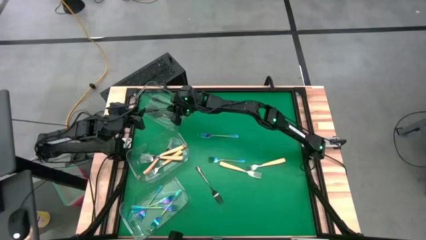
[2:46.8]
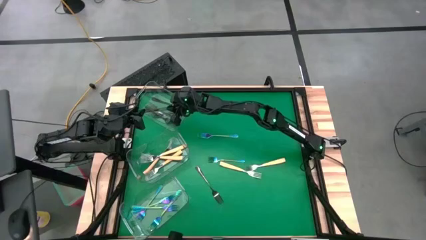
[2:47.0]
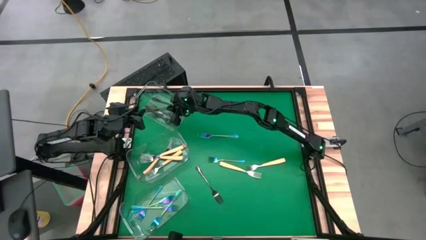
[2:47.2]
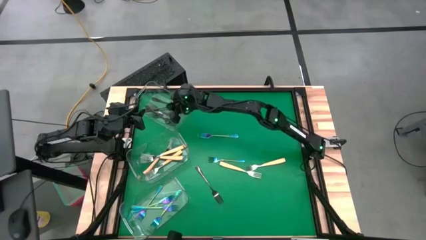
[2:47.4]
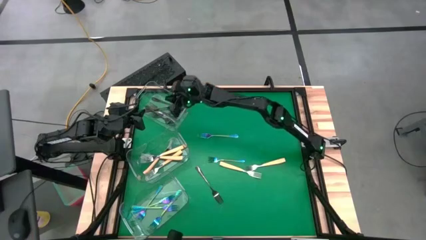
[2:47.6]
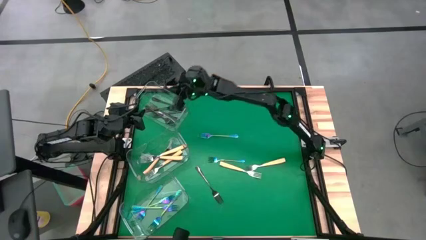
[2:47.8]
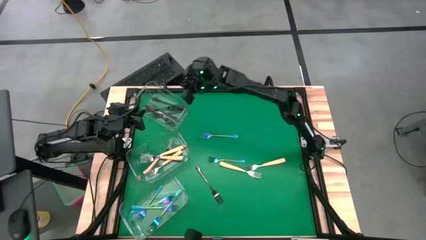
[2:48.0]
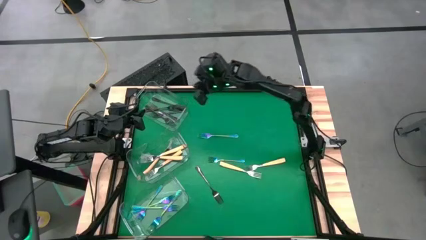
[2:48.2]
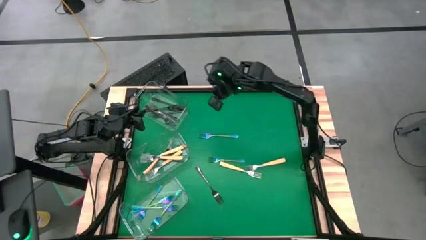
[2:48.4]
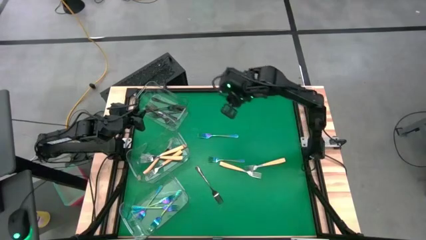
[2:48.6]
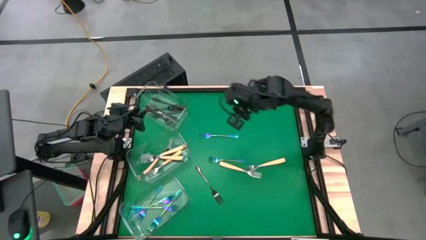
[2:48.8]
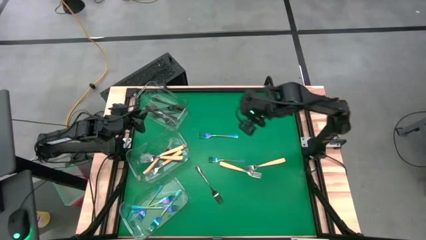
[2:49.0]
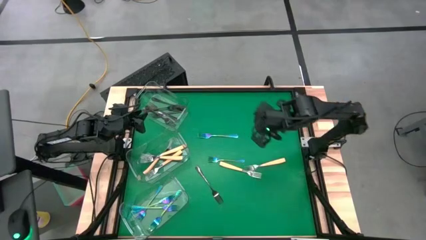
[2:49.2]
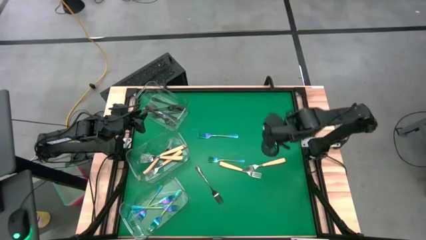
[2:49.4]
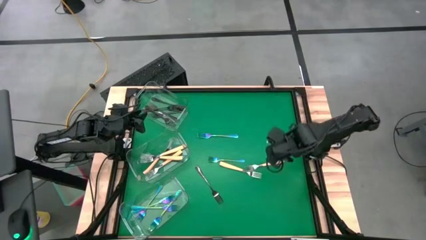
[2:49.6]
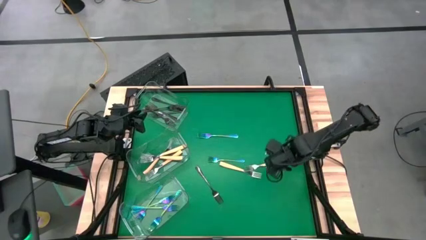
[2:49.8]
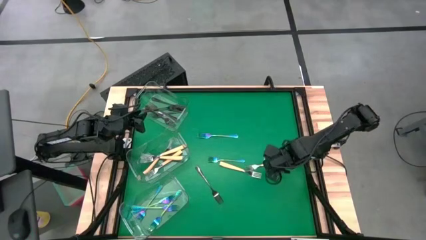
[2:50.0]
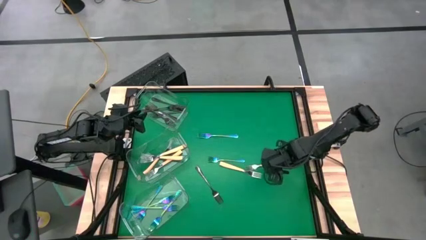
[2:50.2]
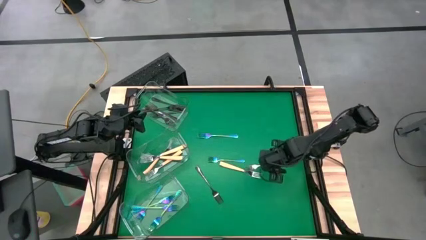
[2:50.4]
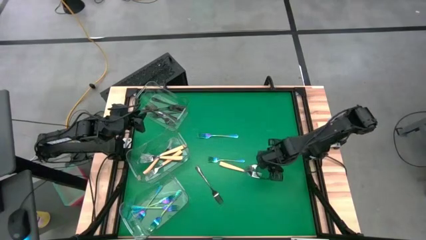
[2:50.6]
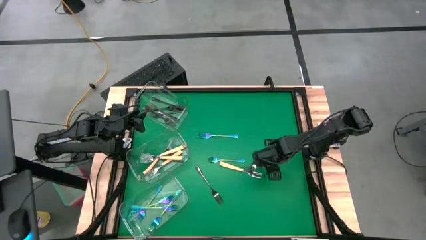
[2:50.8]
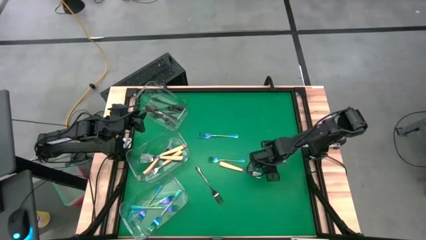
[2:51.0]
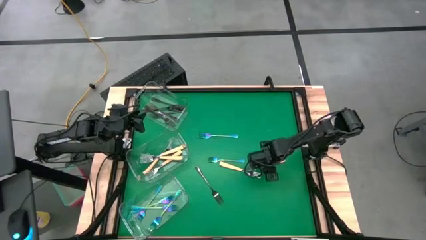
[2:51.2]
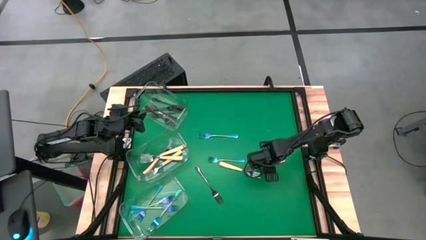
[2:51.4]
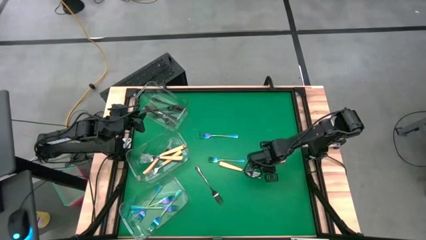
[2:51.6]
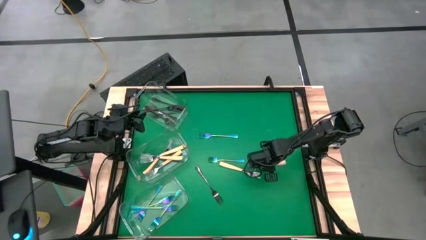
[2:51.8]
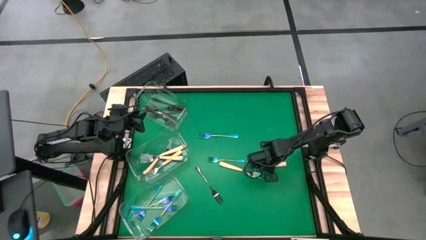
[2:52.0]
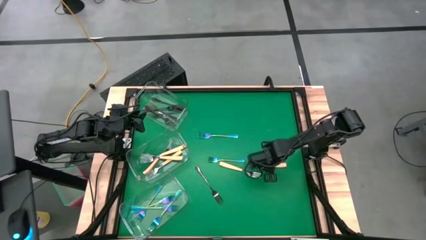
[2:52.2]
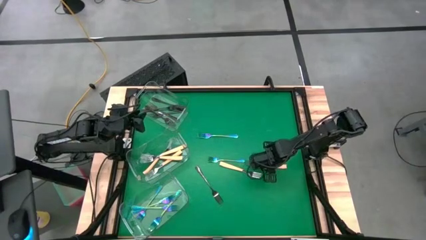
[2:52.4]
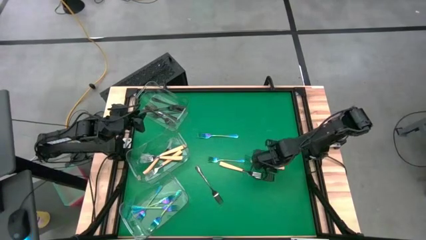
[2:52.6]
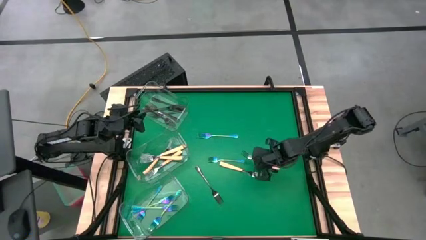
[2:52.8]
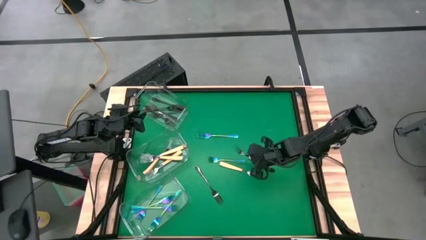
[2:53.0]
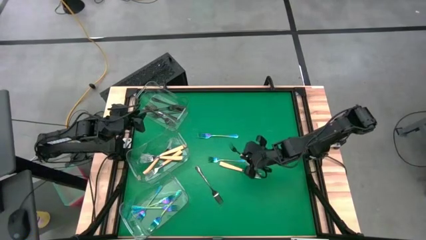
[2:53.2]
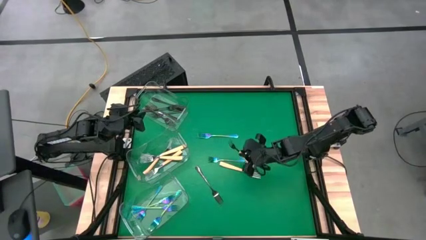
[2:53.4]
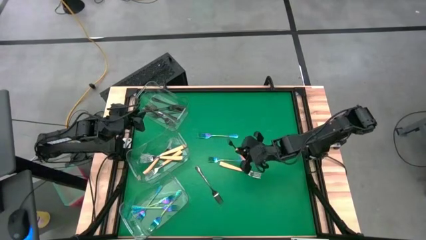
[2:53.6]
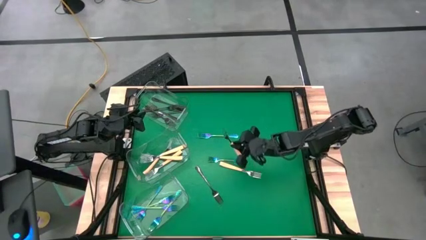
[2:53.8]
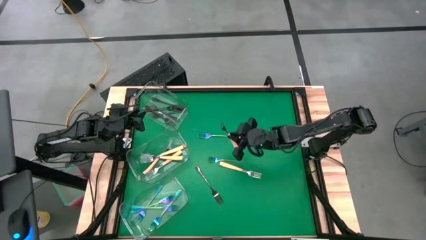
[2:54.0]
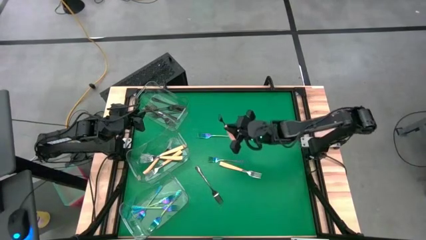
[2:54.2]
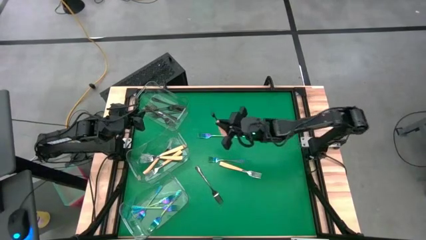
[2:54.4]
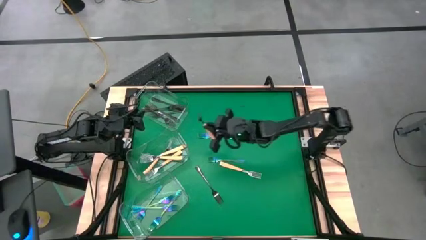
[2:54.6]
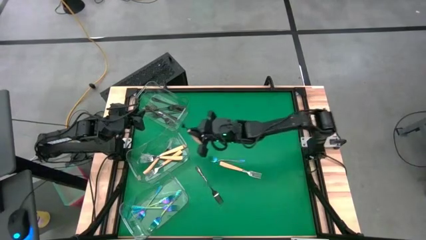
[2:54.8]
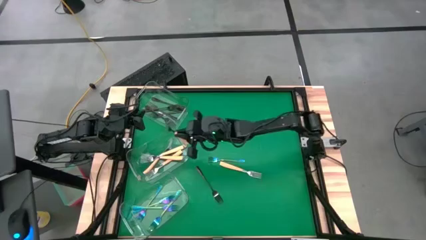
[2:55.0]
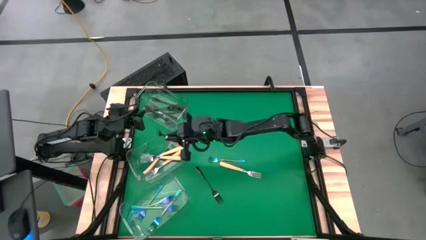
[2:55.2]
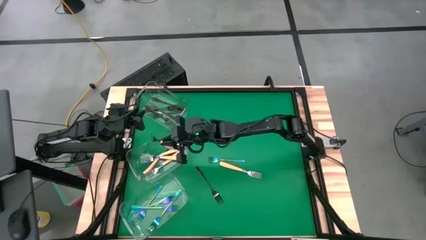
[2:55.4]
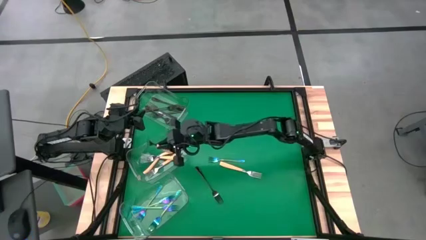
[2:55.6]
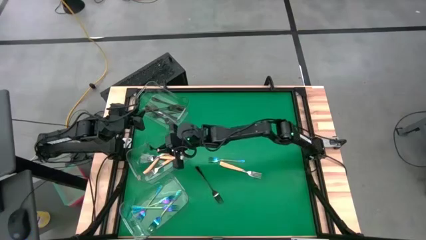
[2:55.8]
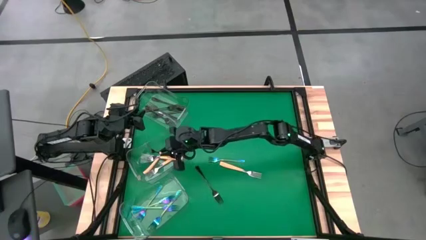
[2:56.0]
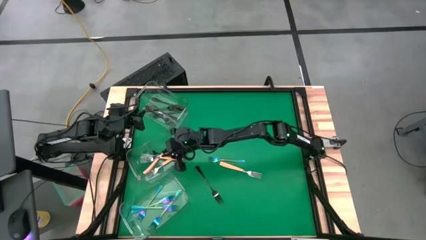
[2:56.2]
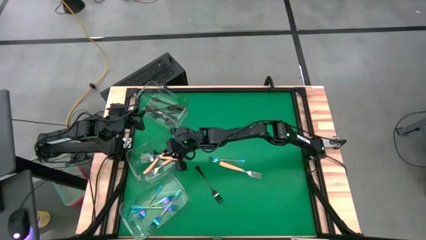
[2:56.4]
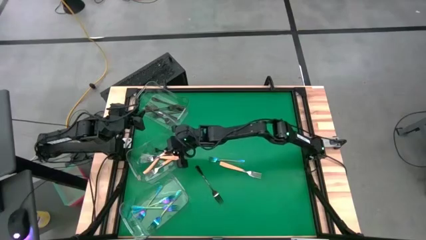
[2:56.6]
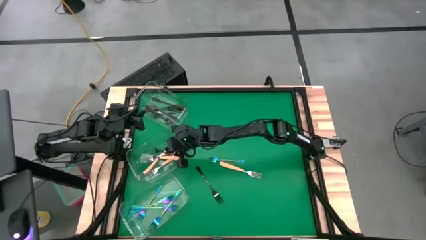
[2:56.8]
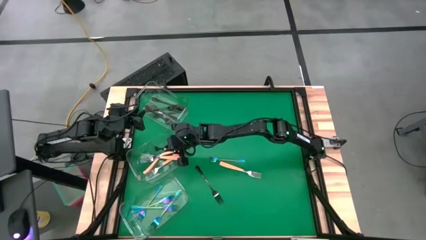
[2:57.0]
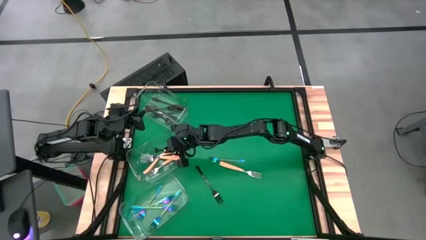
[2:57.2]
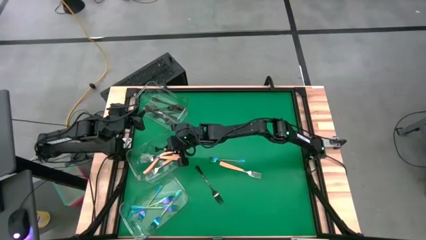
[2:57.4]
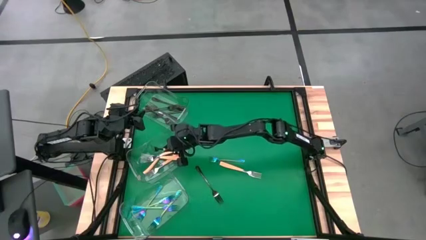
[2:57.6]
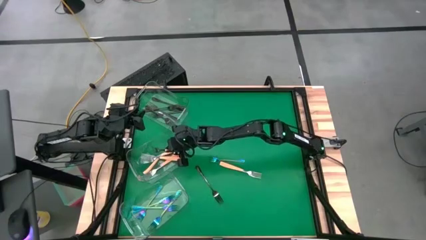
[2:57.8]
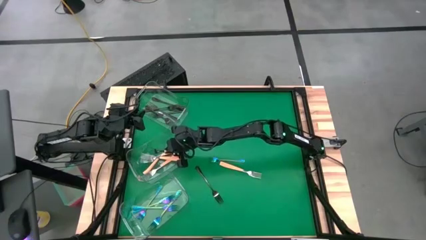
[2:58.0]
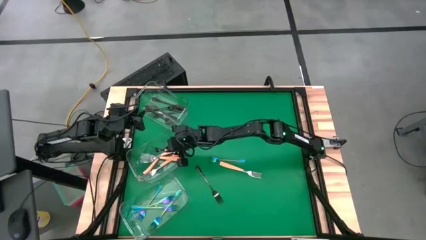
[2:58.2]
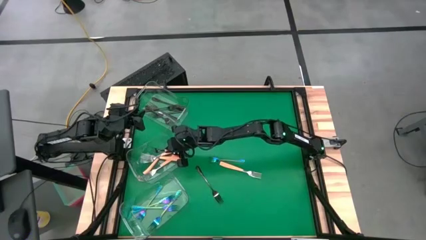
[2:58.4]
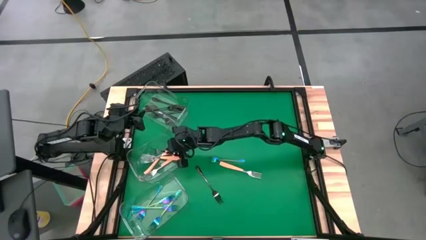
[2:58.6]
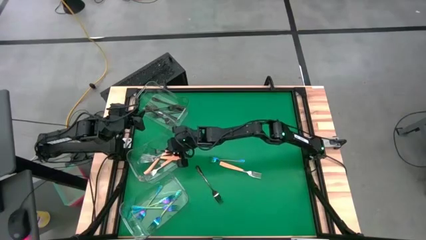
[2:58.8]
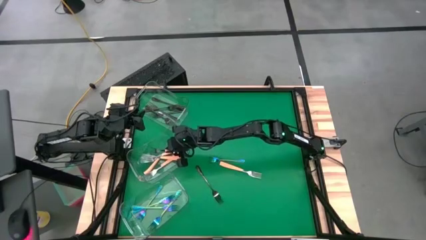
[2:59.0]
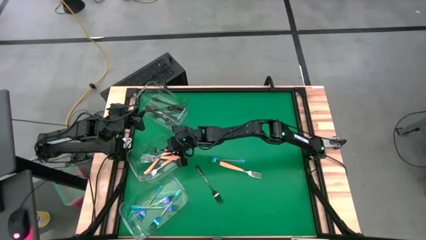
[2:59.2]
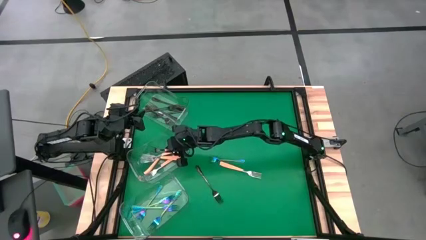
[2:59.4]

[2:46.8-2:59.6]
Task: Sort silverware by color (type)
Put the orange fork into the middle transparent bin

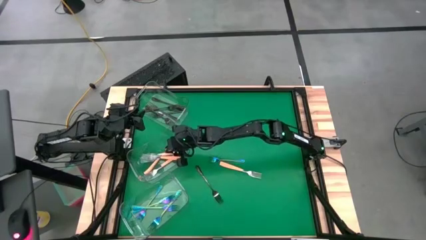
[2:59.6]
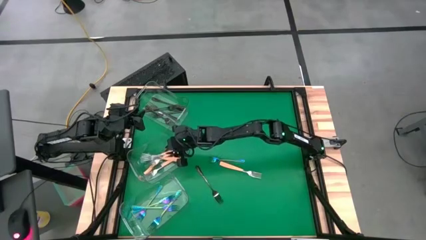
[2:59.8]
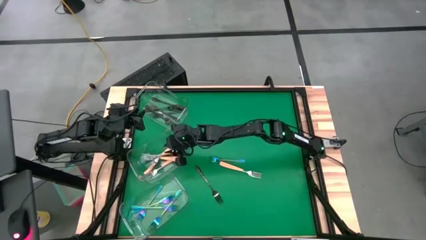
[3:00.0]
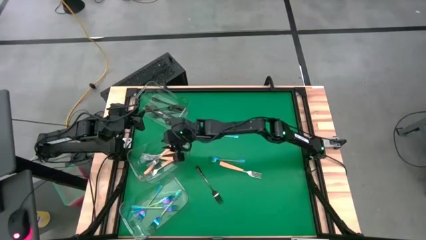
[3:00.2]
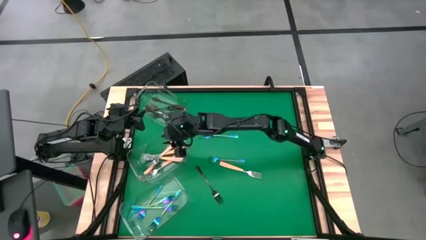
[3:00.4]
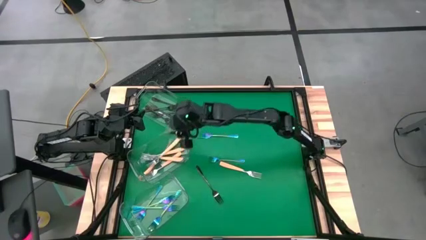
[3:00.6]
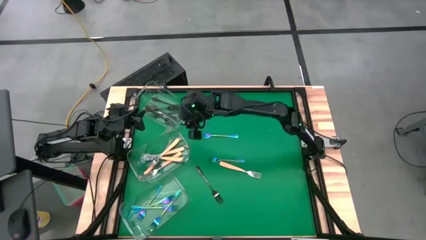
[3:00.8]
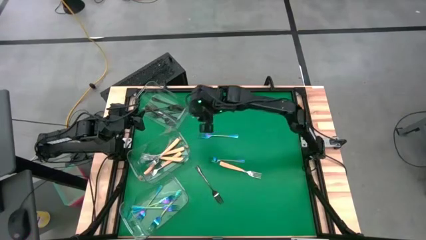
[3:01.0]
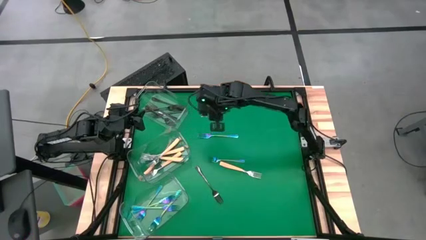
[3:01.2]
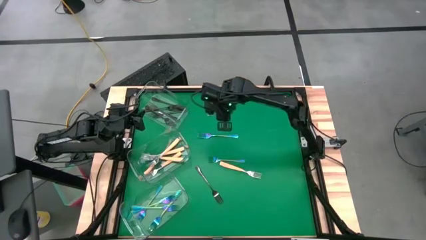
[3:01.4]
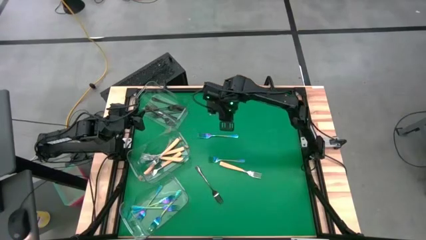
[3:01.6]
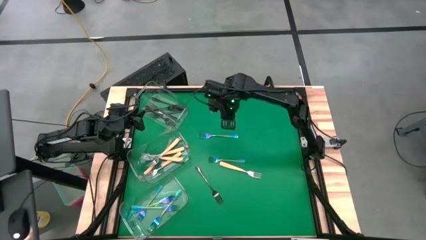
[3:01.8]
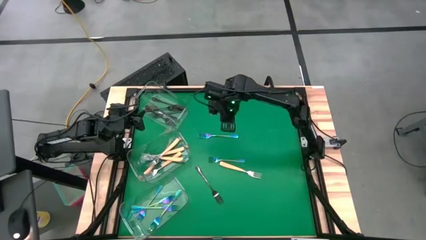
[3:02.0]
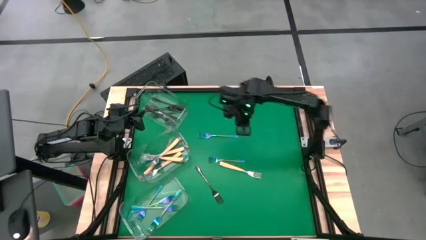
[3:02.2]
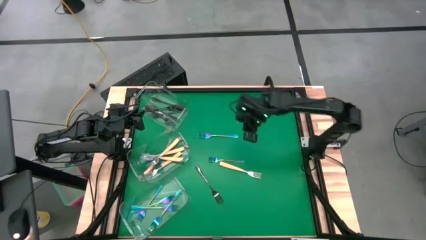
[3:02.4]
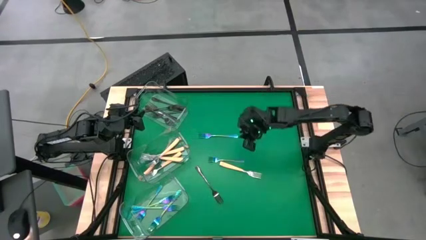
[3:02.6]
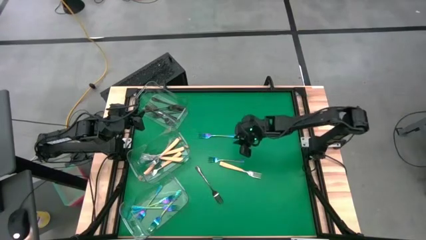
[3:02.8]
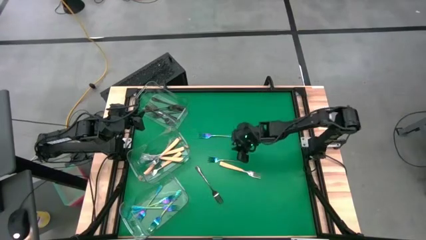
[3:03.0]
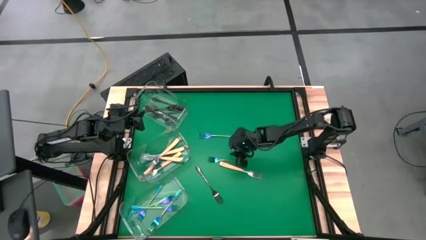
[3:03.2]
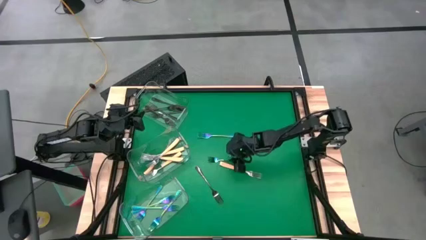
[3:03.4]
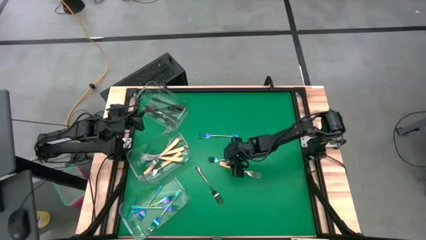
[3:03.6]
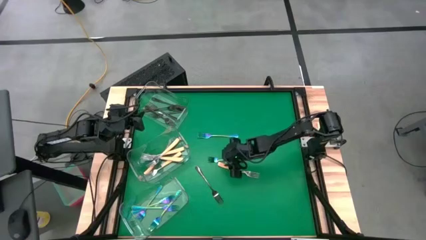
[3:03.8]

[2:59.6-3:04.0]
Put the blue fork into the bottom transparent bin
